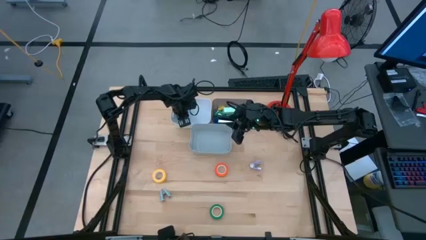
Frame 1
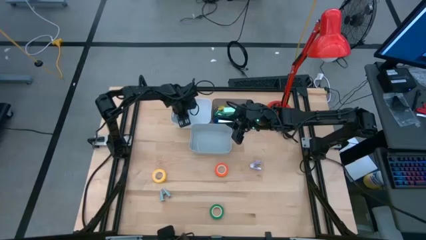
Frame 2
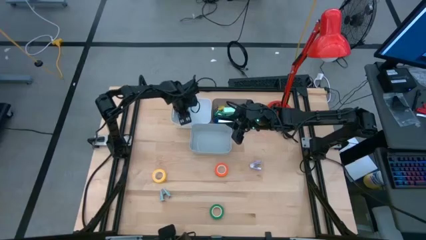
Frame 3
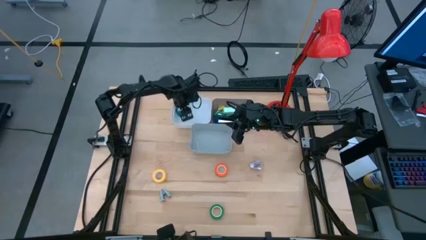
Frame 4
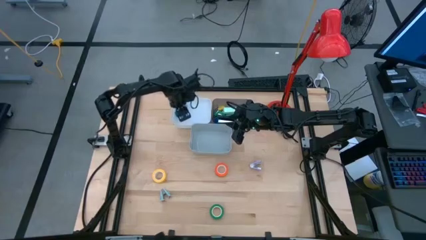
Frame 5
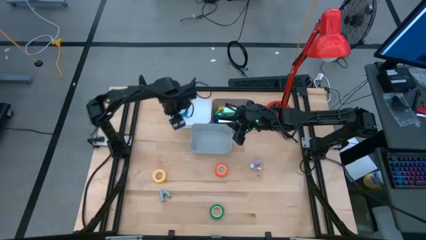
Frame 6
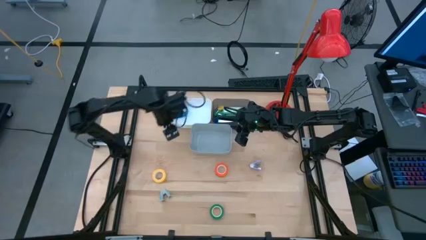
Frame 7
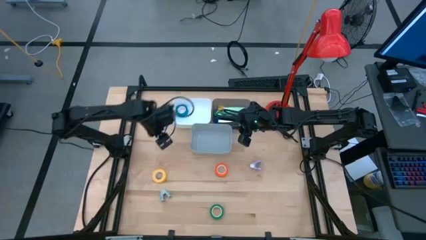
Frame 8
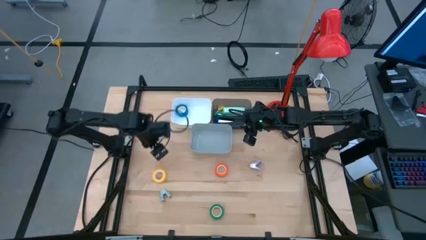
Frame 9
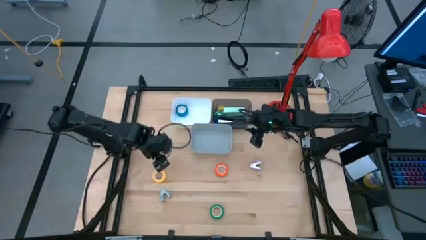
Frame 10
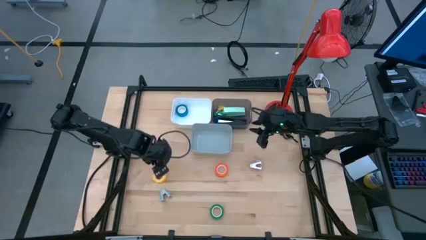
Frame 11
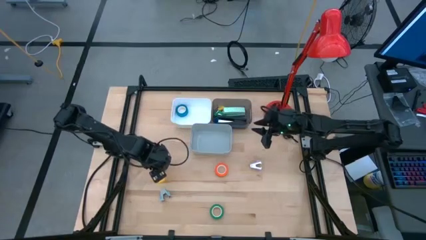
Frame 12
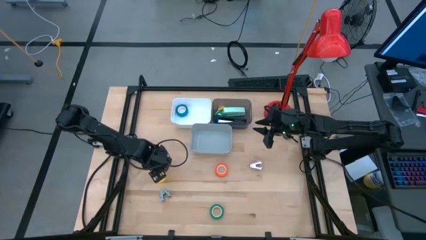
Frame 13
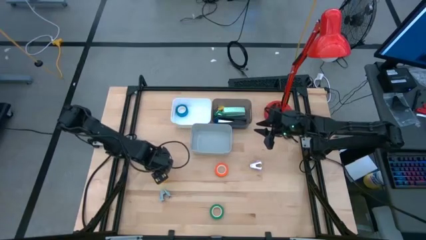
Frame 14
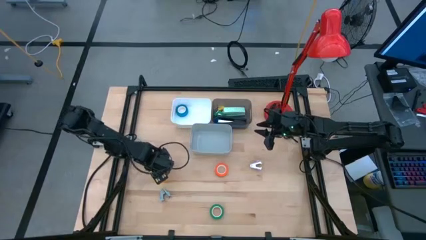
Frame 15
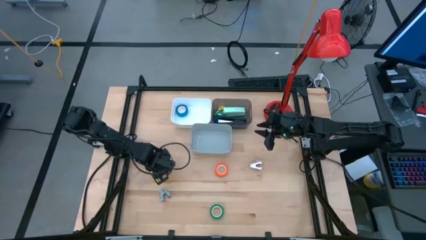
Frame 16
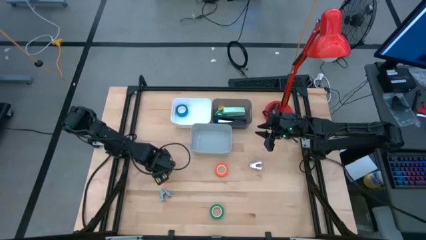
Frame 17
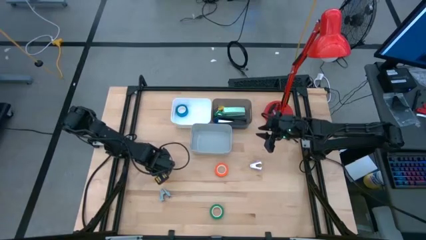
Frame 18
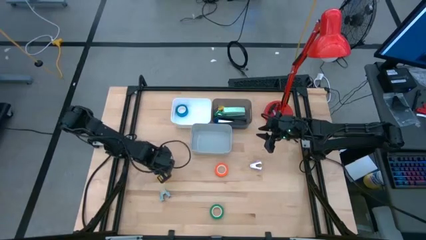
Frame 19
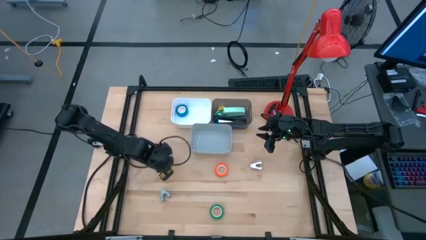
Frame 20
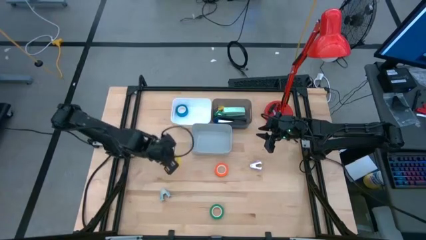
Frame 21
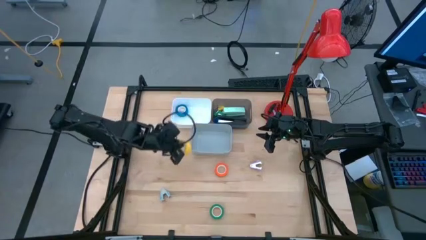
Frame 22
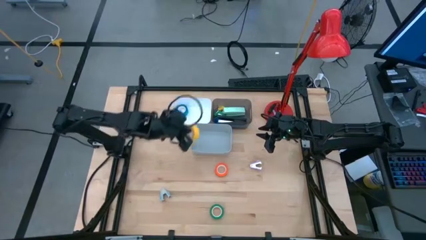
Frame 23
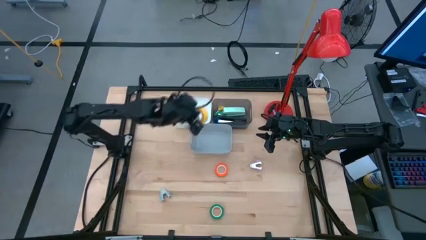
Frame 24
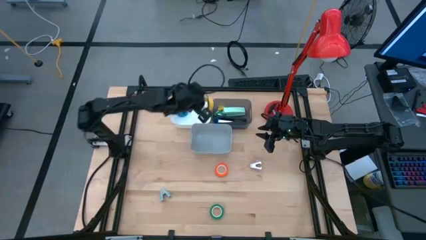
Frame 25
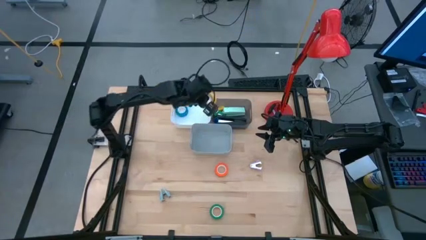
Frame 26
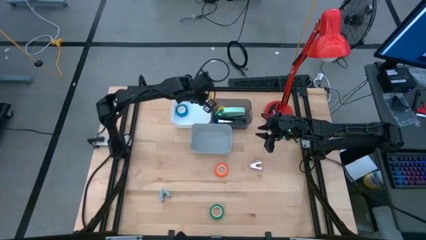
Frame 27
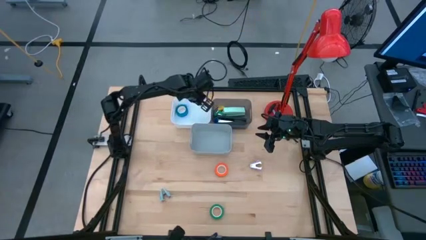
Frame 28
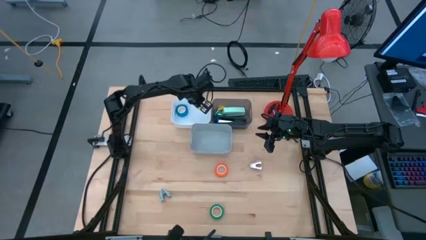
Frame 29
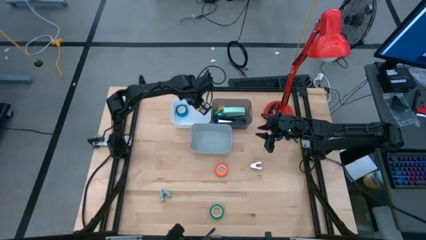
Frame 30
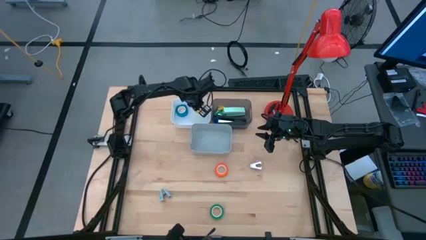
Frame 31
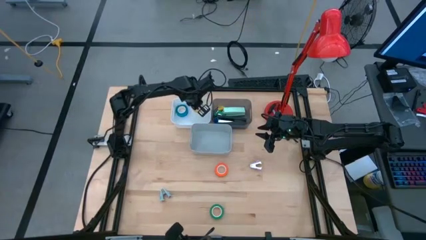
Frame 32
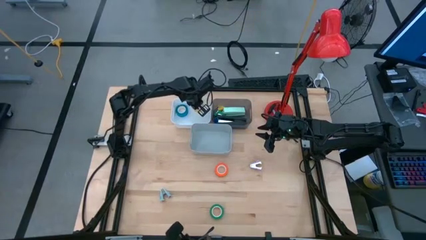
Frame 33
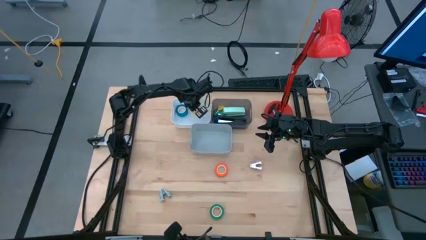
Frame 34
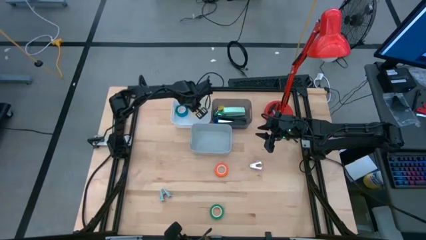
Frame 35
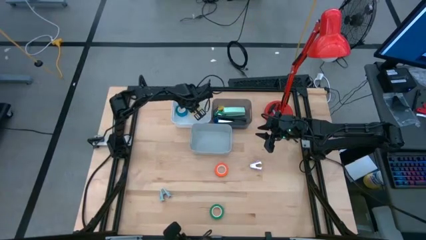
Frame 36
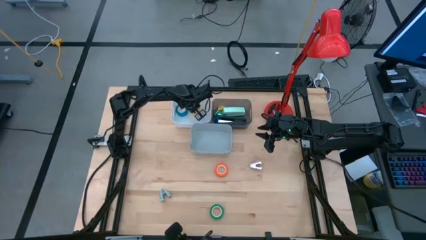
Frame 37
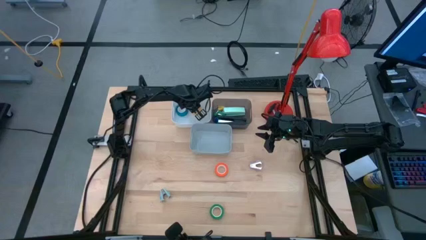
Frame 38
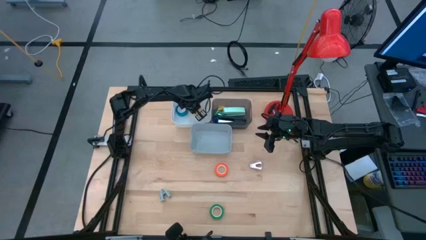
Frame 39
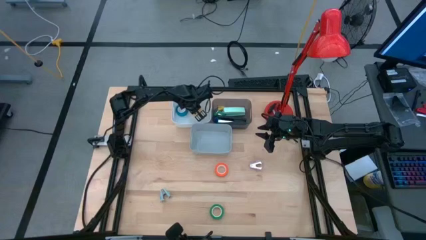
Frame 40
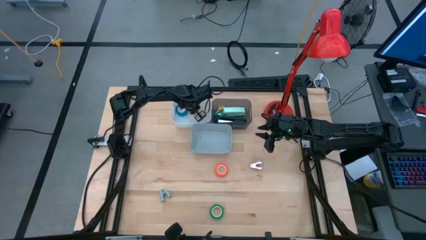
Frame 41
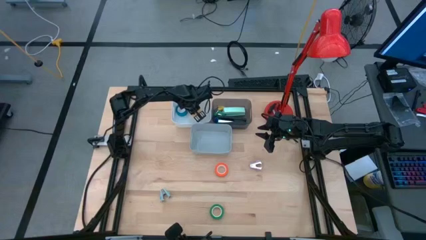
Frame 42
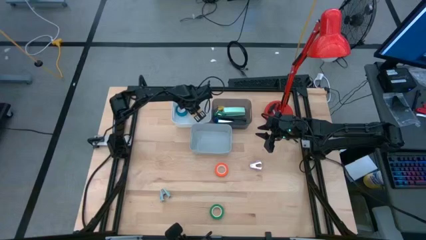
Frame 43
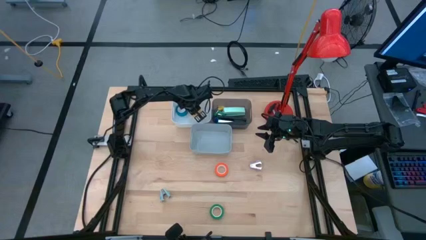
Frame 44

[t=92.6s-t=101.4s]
Task: Pick and place Stapler, Stapler remover, tape
Put the yellow tape into the white bin

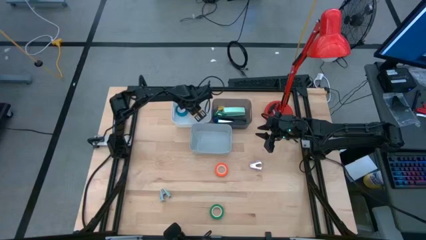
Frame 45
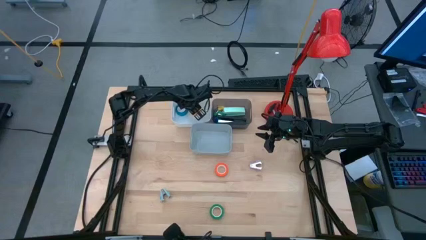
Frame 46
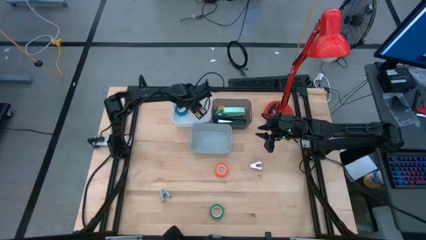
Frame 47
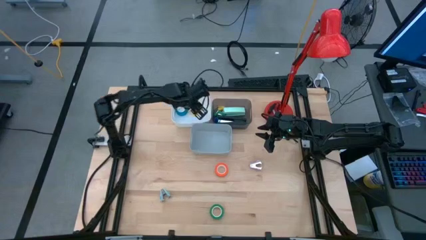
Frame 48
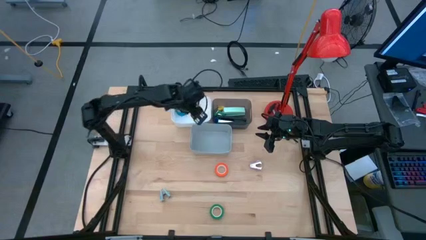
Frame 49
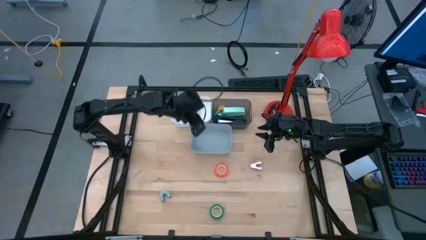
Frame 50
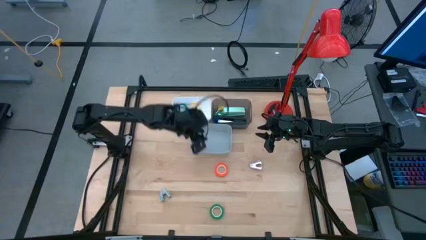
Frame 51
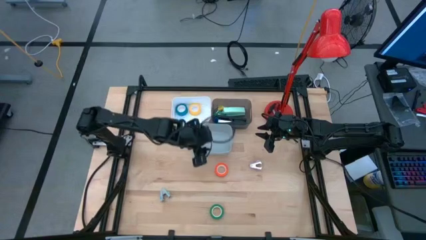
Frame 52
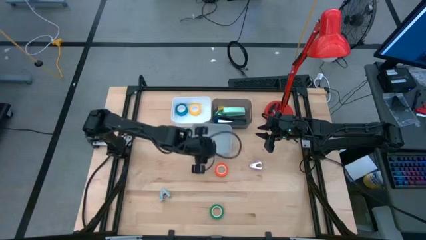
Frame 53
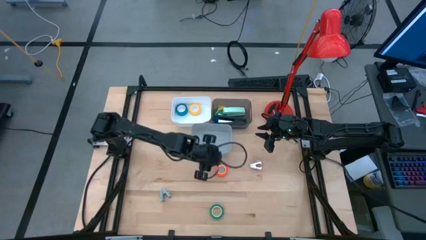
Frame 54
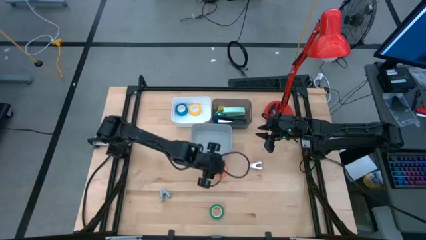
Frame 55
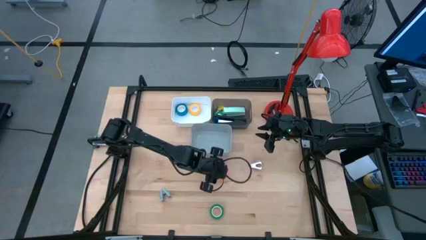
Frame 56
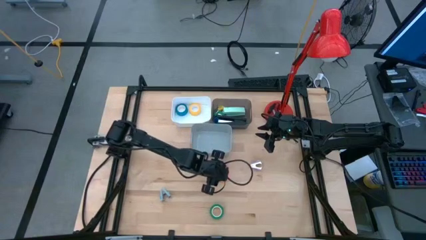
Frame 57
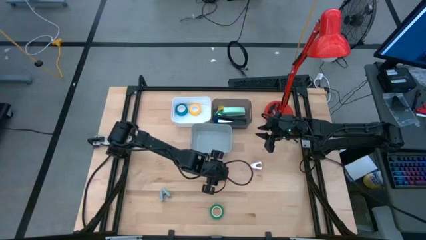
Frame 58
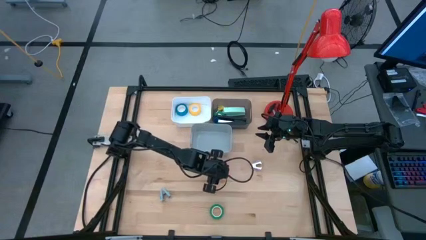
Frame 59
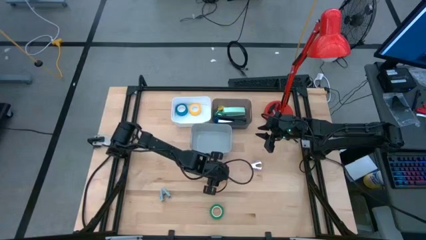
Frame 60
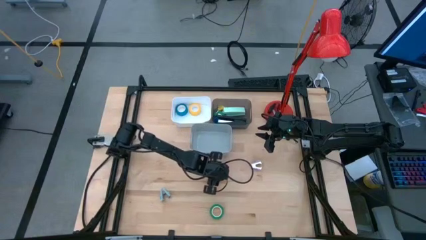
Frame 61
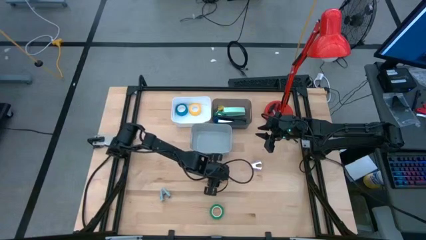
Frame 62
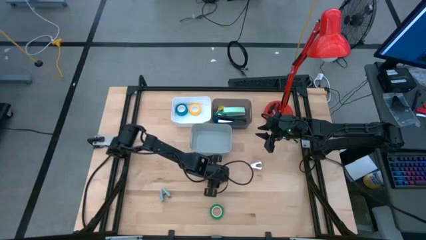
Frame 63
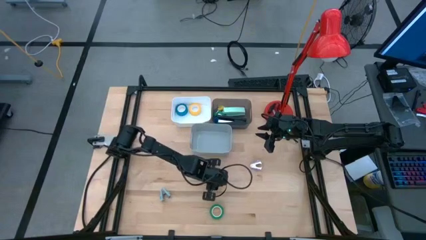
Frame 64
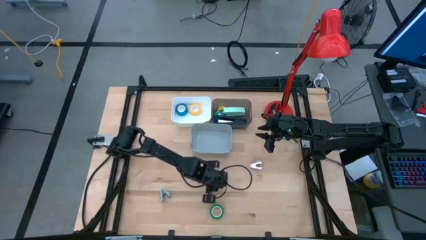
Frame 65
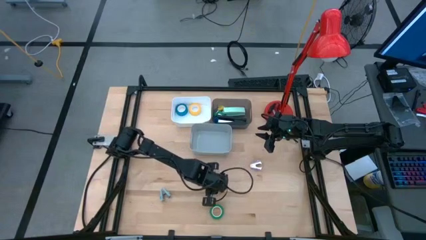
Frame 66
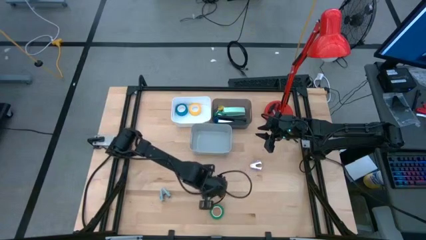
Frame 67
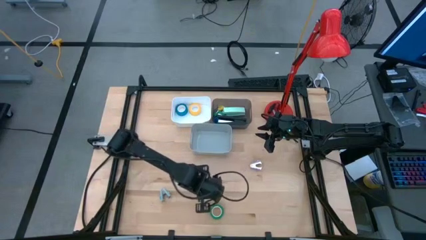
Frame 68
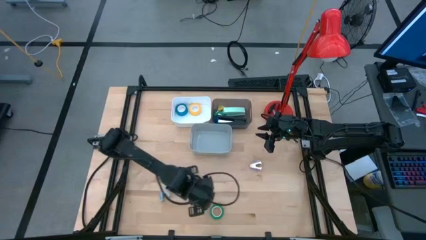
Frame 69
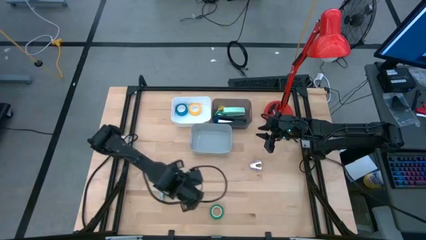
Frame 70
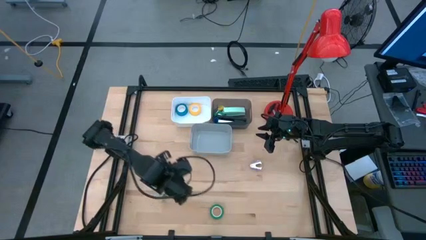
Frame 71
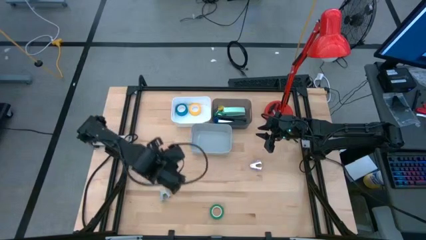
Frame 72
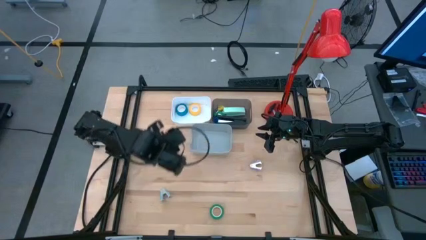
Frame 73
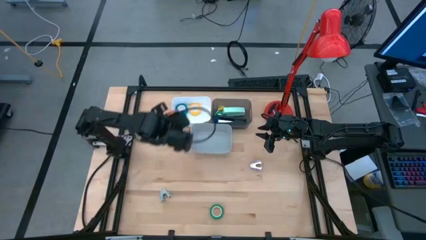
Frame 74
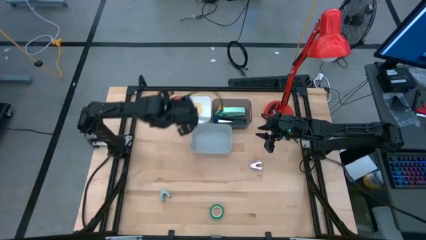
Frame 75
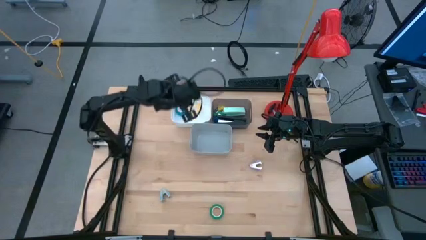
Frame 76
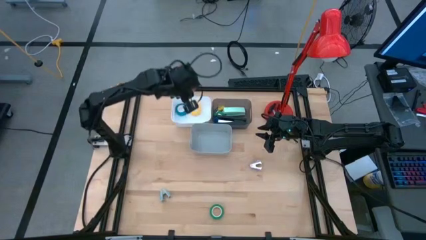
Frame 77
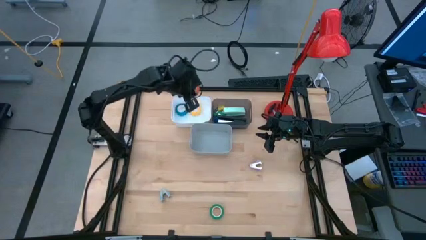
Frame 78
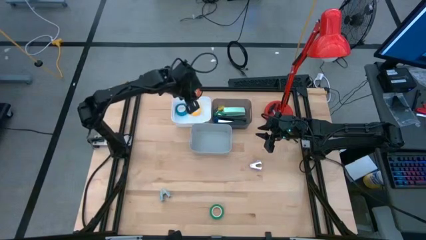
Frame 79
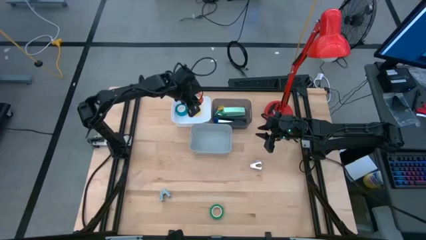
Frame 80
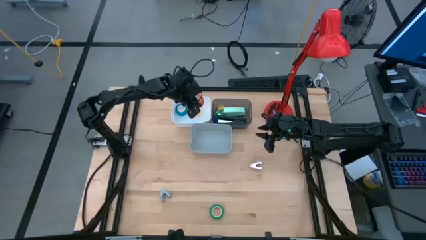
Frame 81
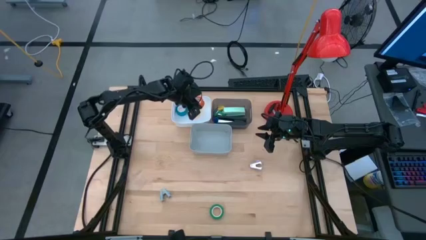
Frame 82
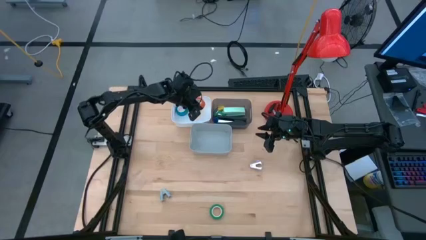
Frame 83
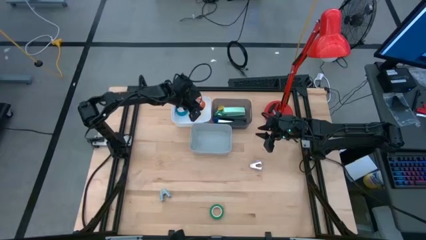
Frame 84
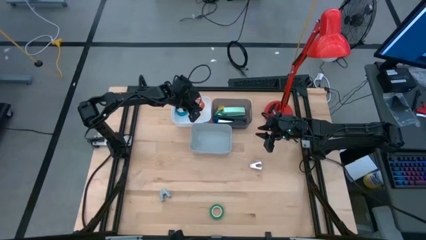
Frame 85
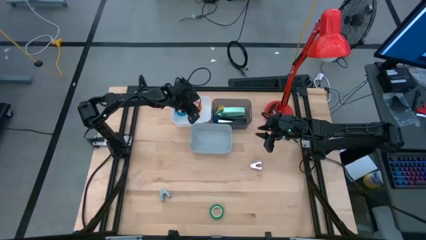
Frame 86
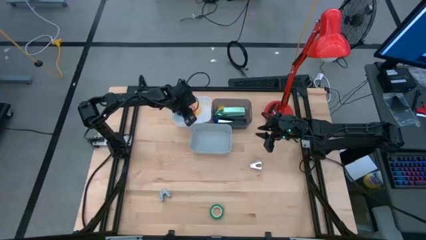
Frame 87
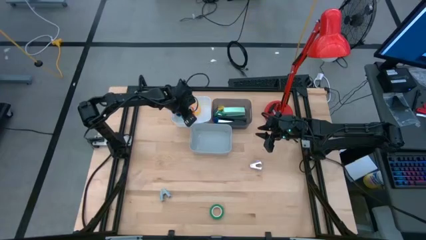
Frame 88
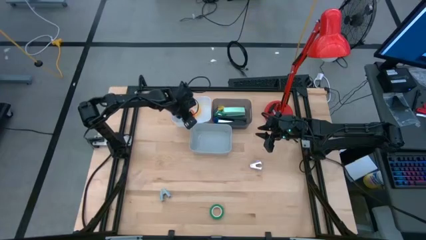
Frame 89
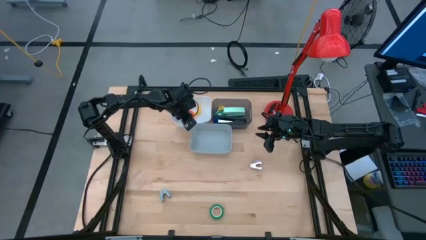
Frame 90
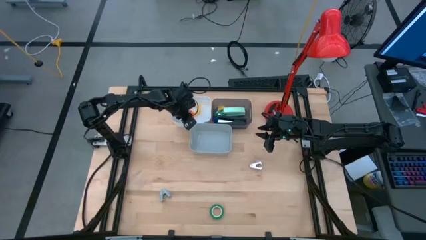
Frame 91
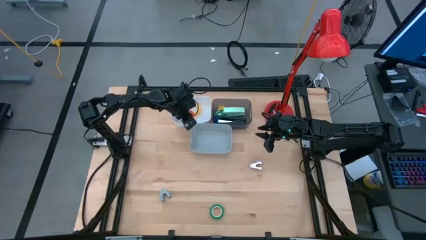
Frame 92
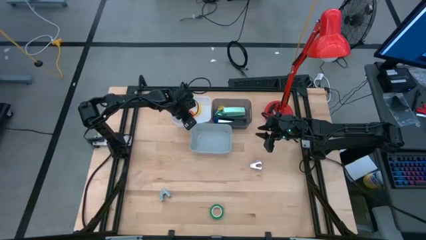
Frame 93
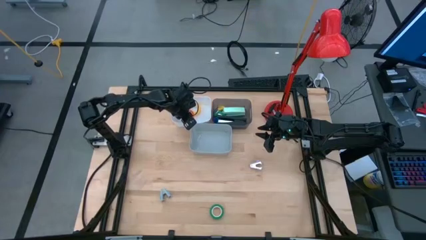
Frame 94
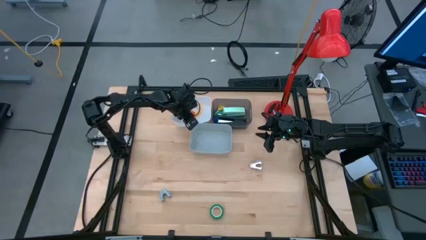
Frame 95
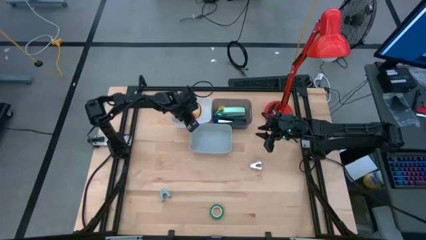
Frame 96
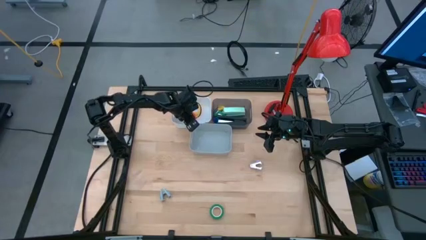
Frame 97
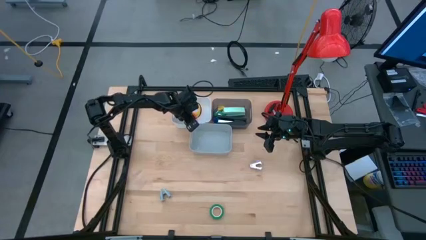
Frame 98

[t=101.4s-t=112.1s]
Put the orange tape into the white bin
